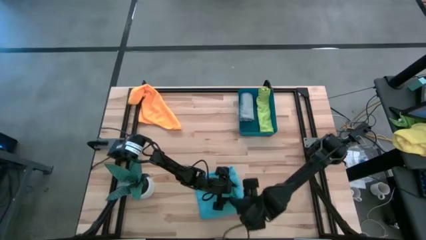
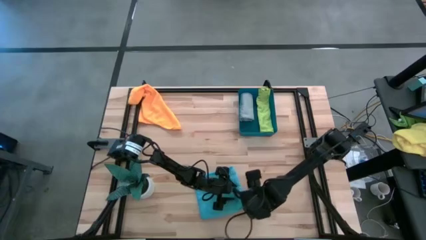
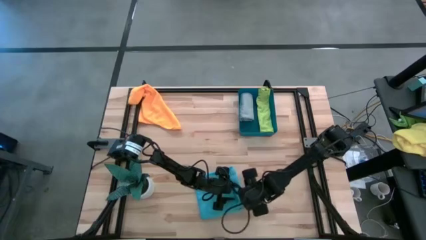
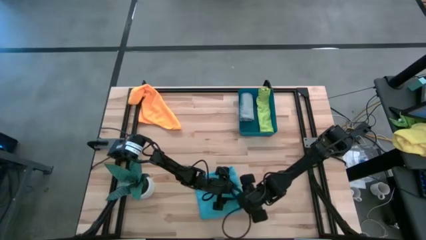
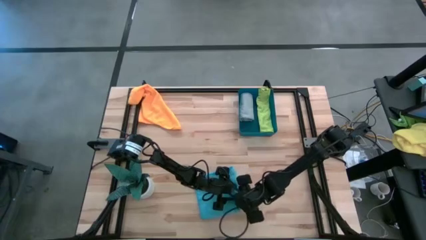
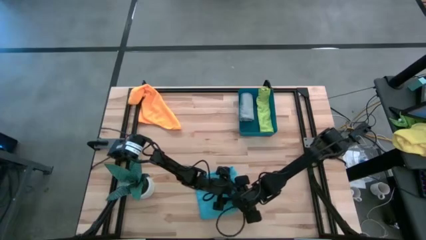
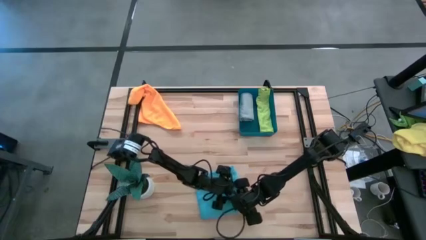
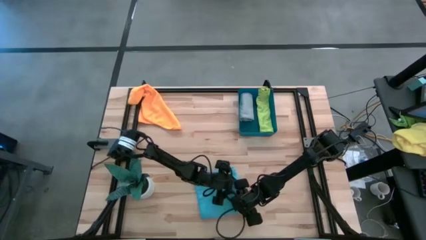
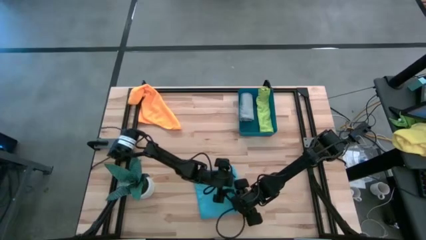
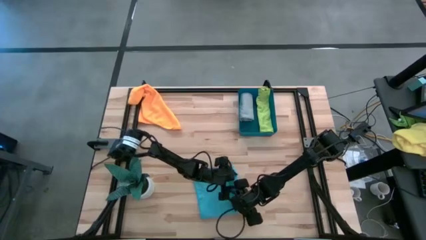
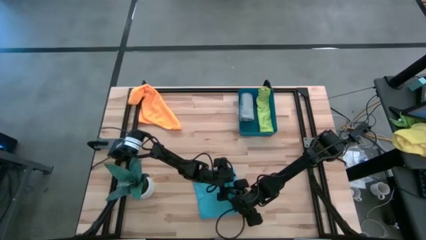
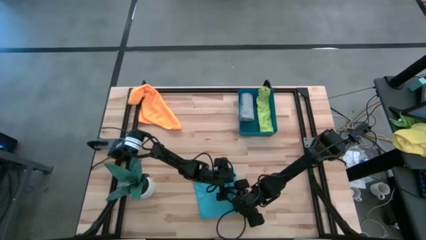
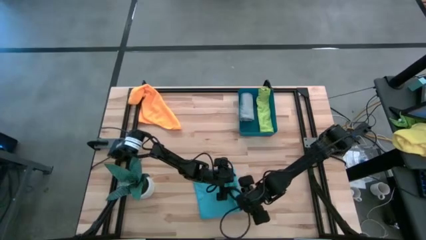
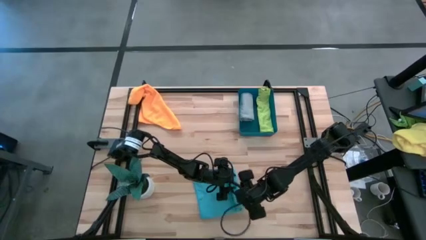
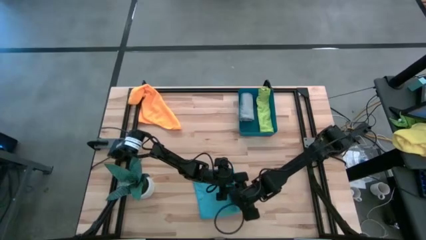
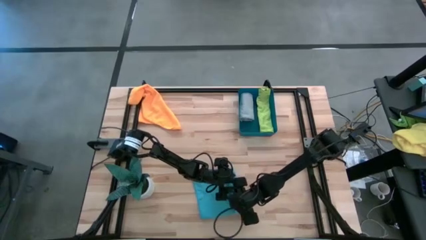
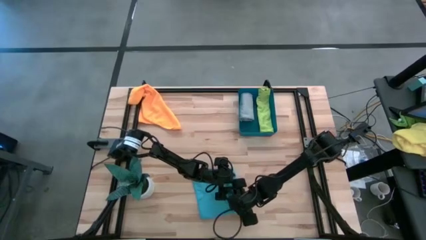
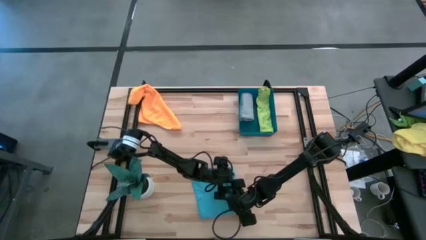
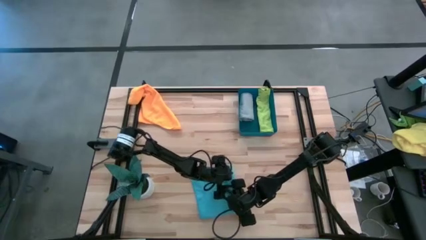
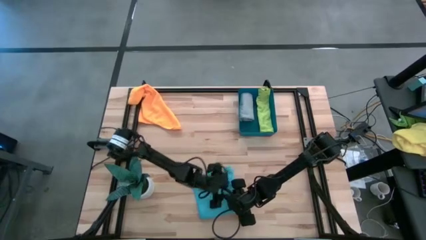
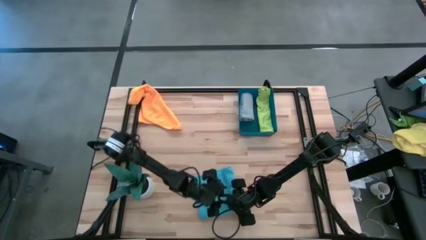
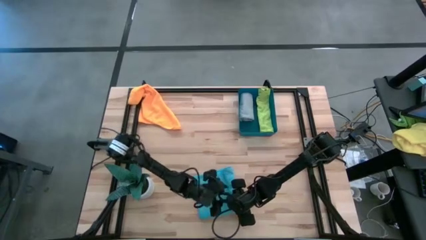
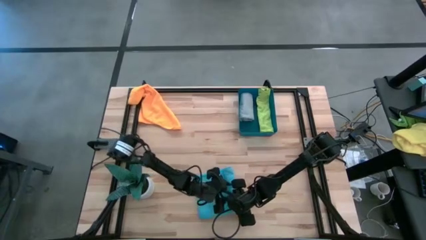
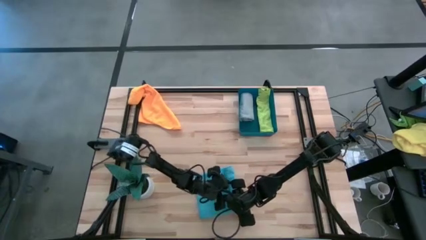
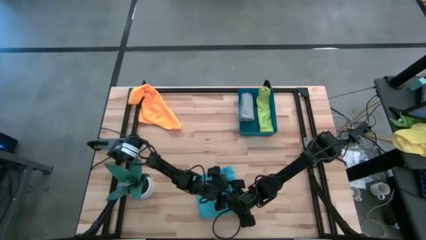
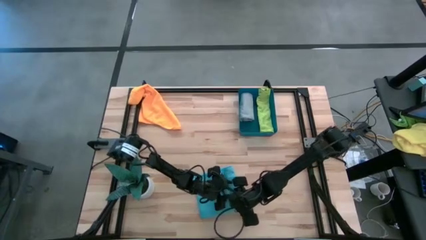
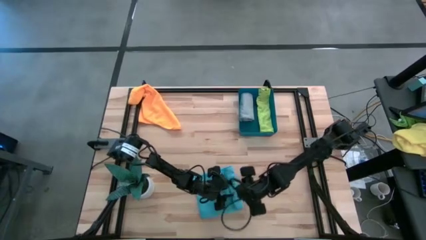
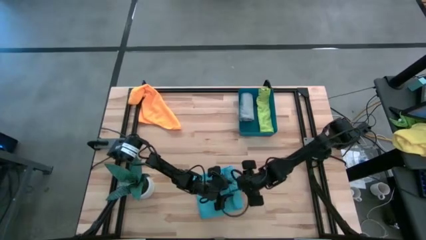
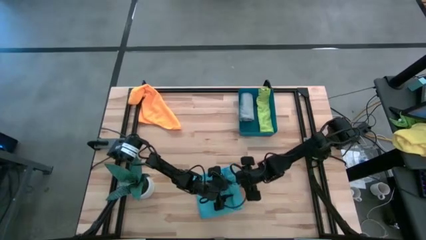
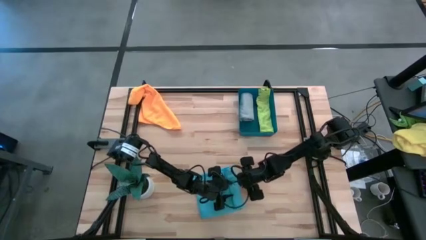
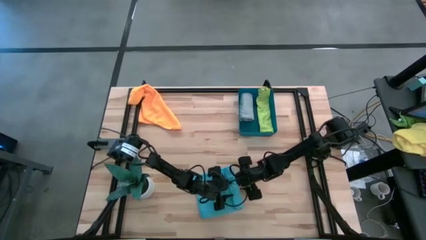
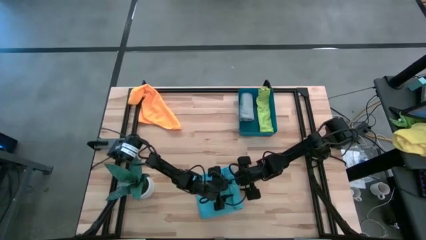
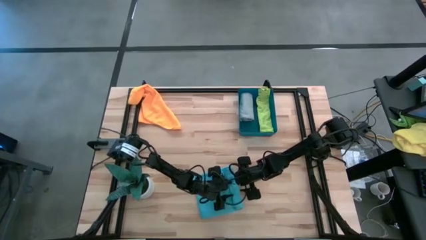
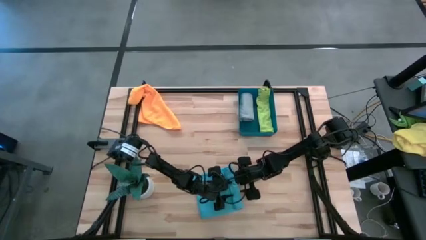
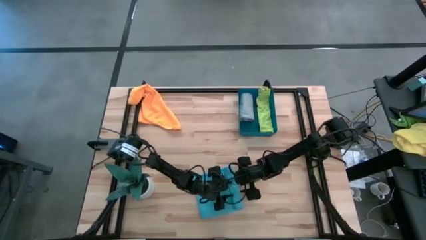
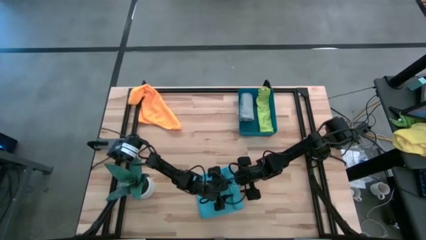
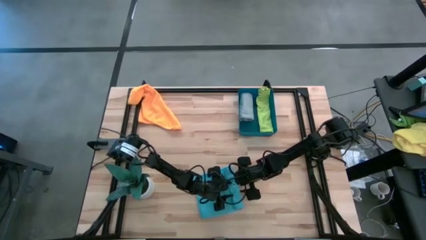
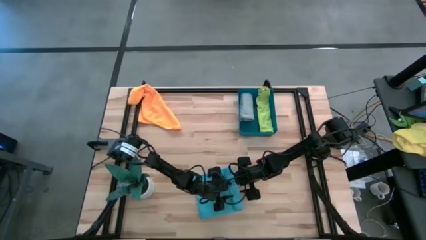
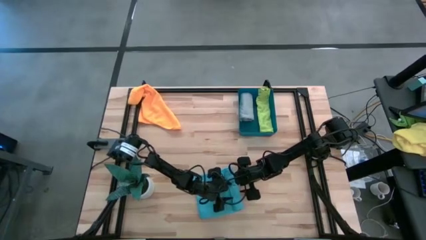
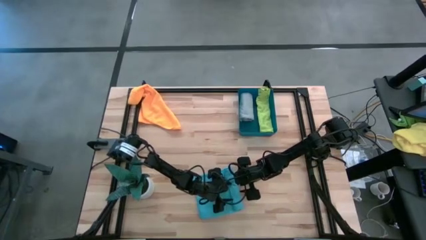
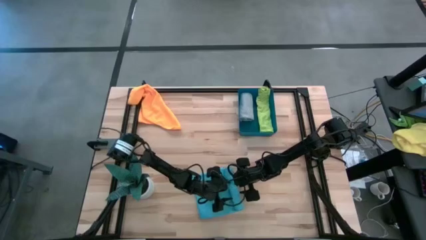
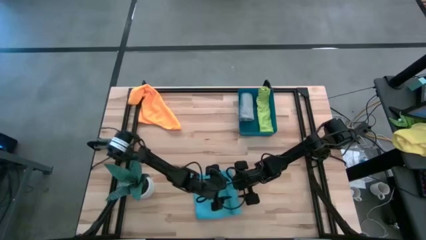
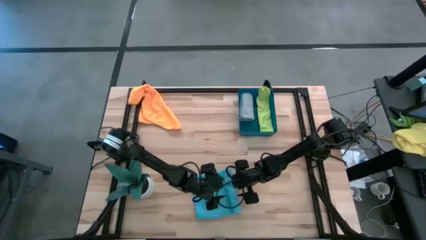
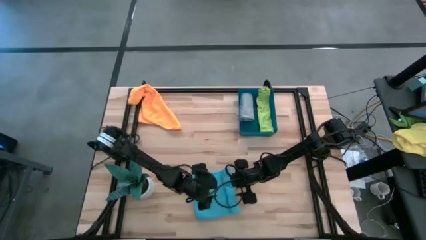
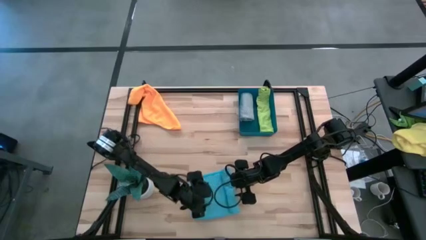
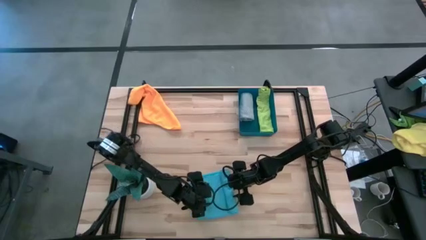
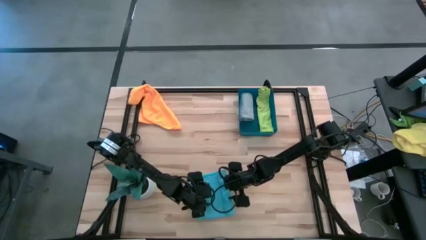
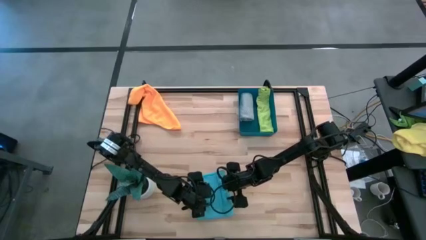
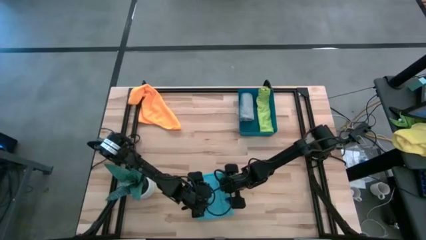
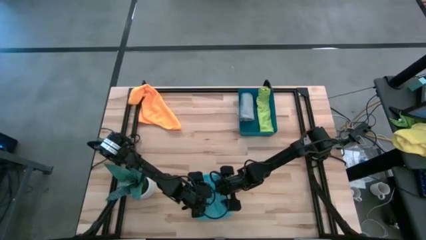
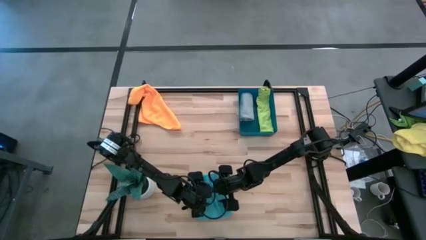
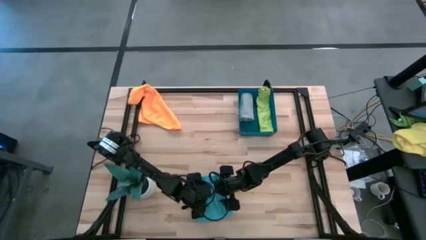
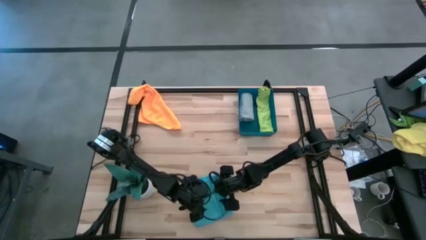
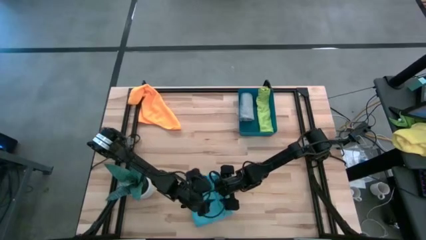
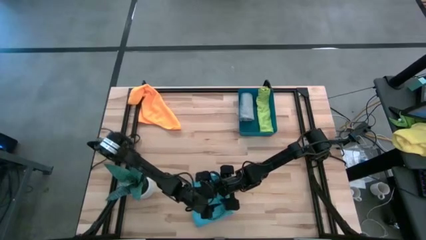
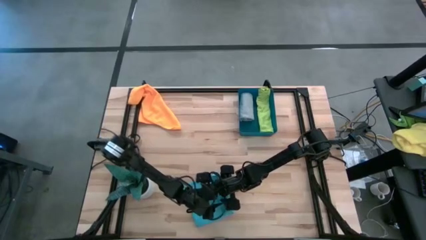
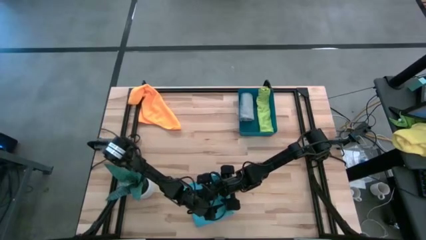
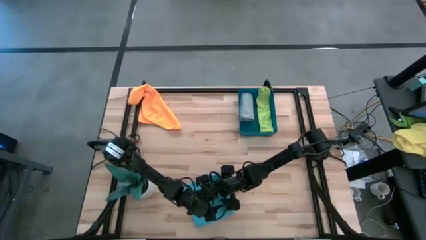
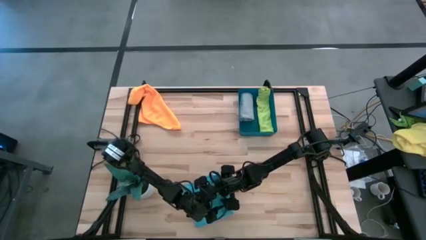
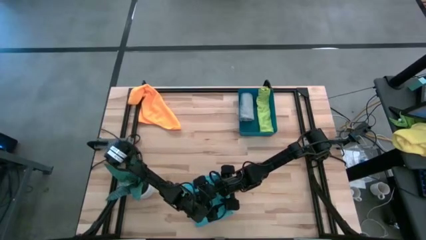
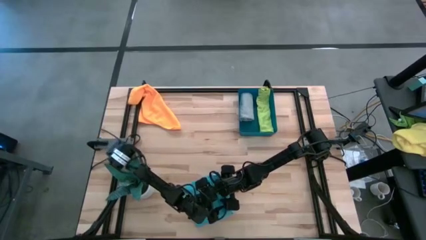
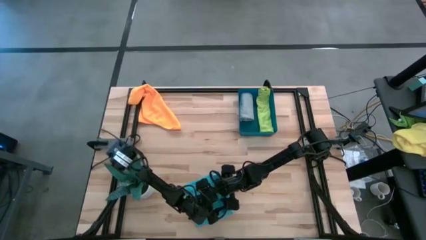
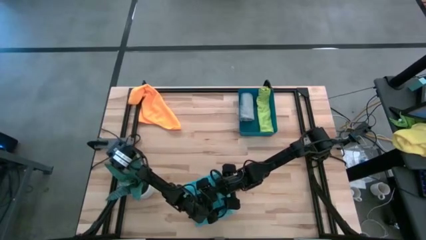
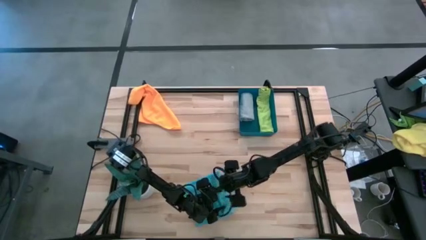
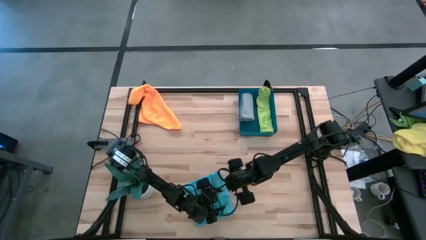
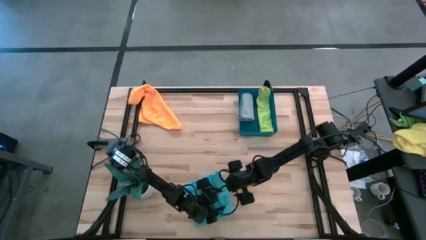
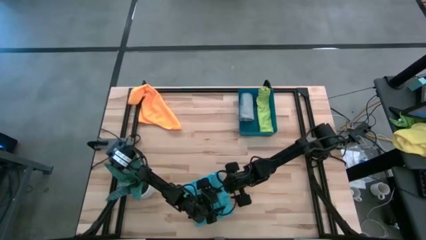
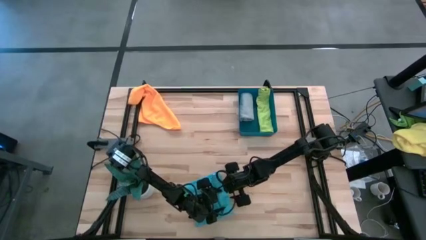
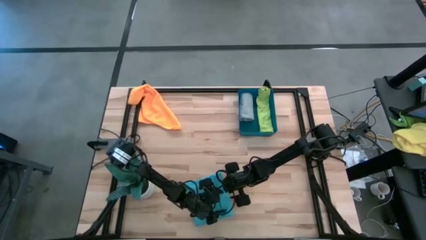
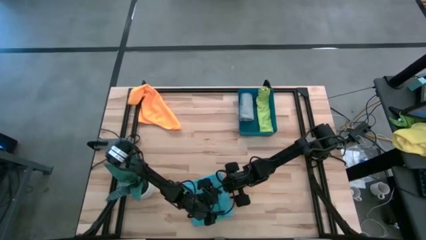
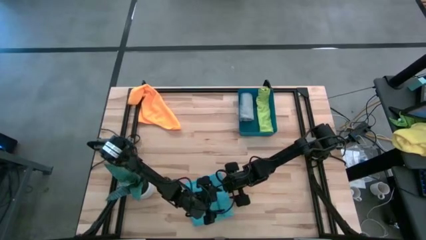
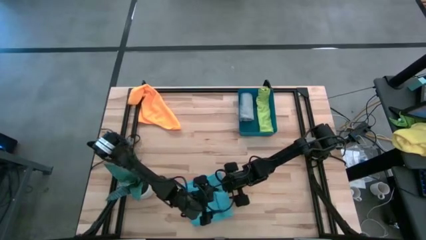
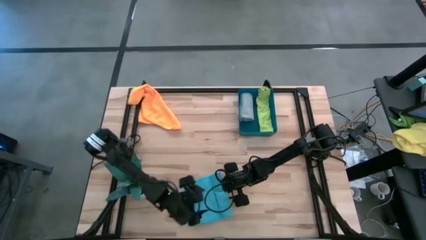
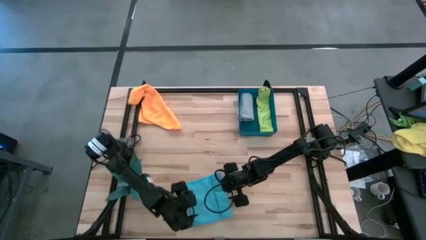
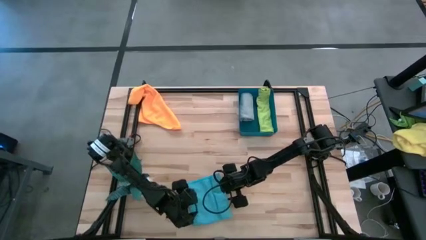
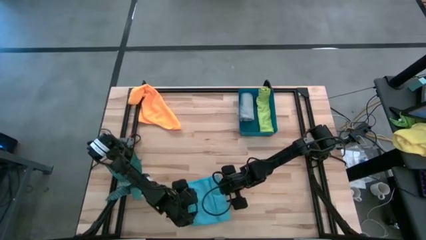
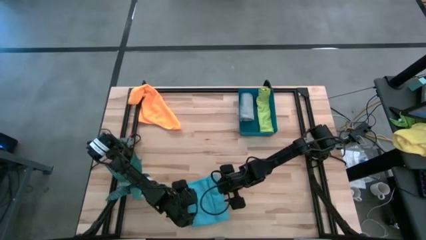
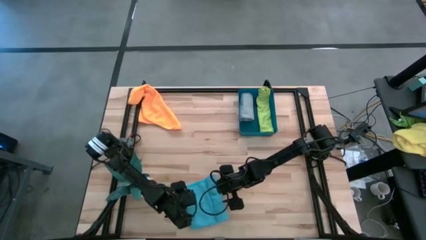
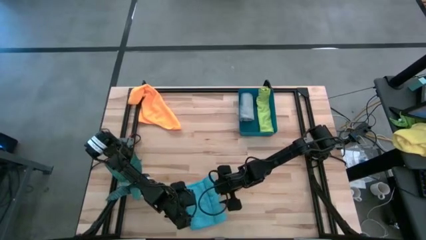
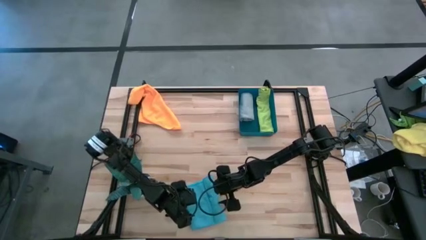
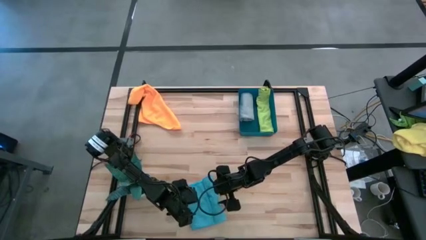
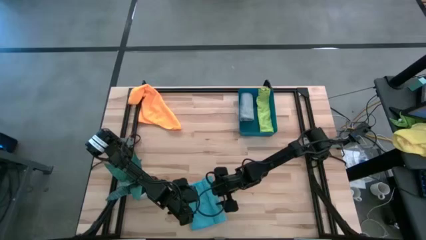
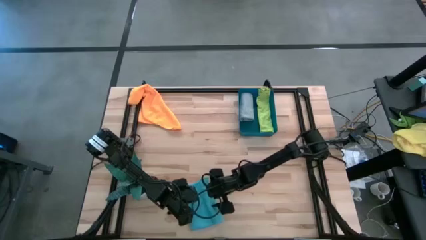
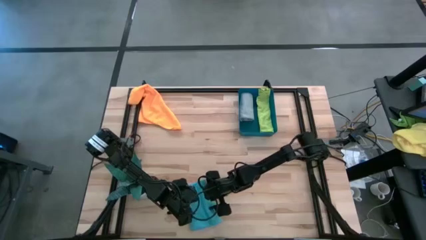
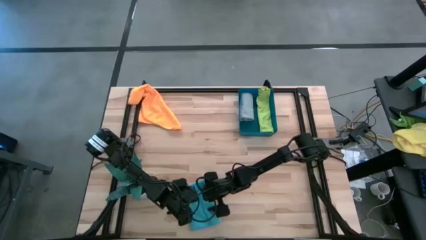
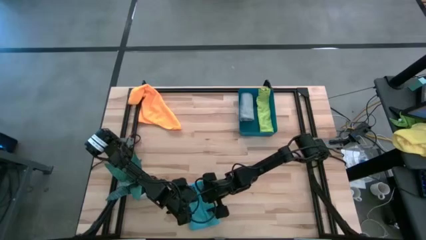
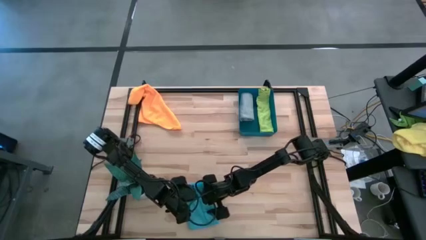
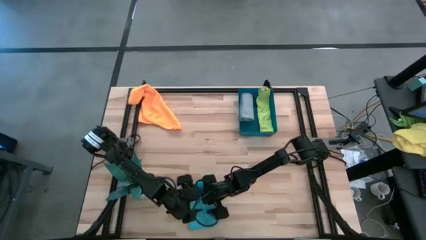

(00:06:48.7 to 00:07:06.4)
Task: Roll microfiber towels into tight, uniform cylinder then place into a basket
Roll the blue towel
